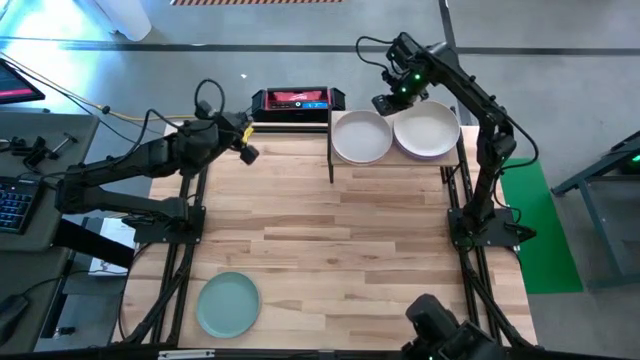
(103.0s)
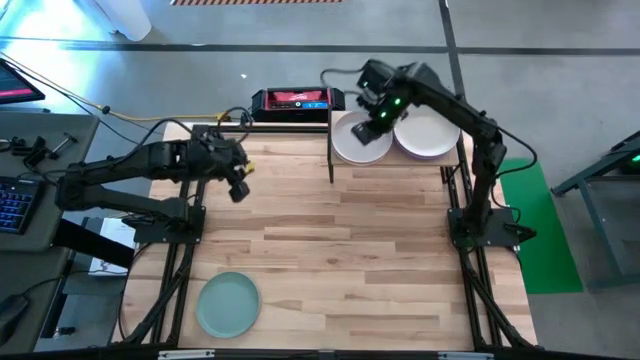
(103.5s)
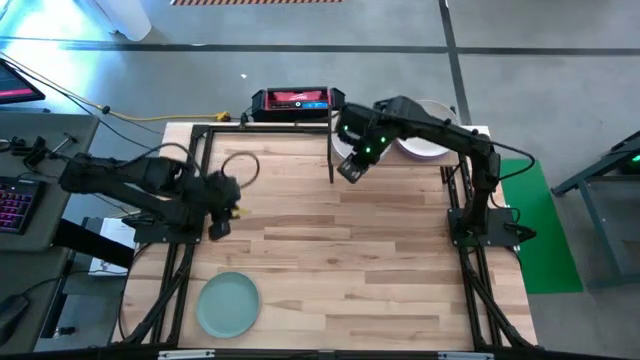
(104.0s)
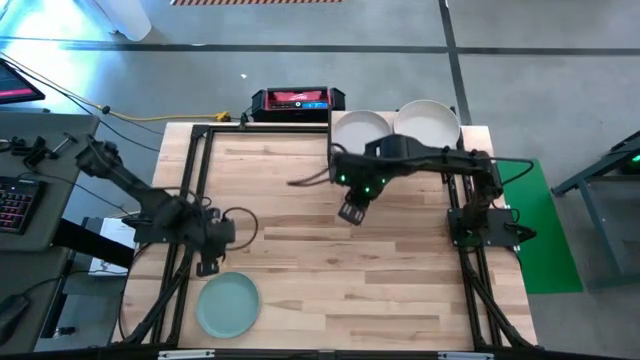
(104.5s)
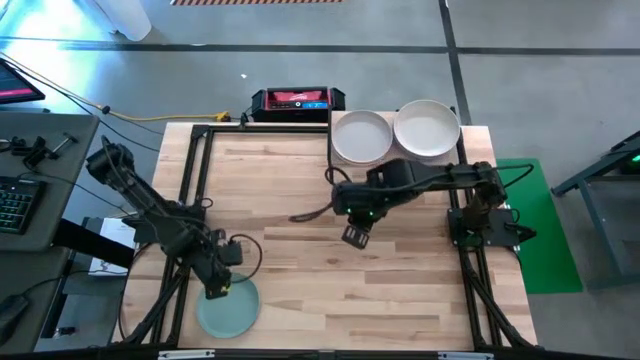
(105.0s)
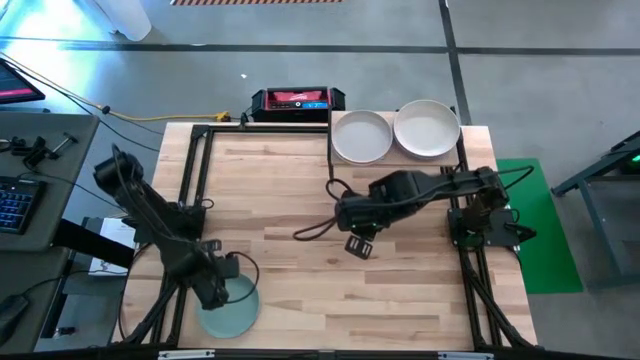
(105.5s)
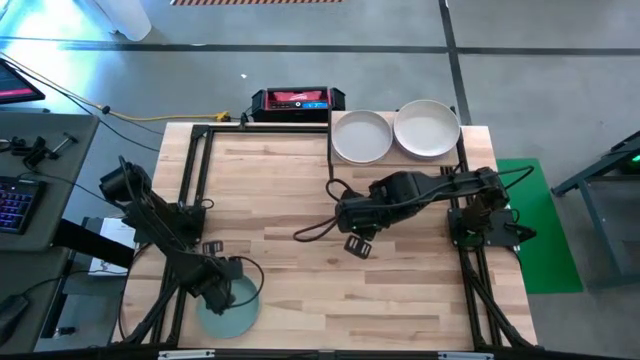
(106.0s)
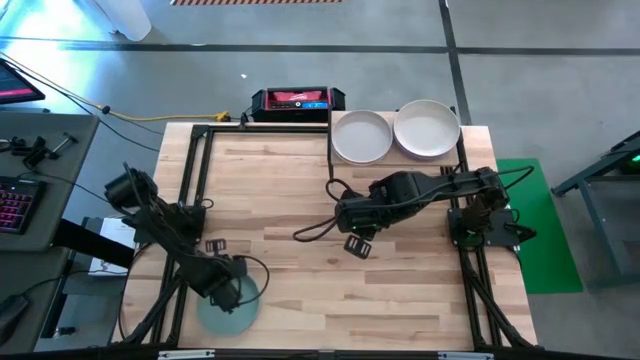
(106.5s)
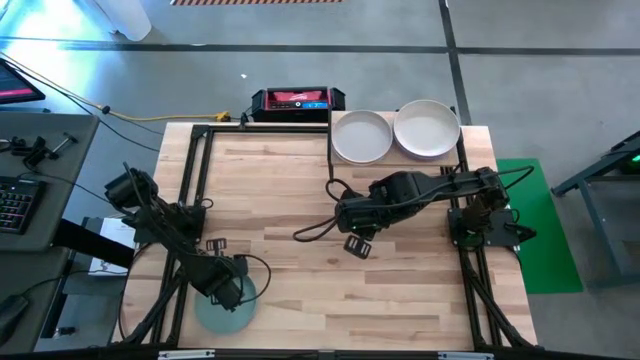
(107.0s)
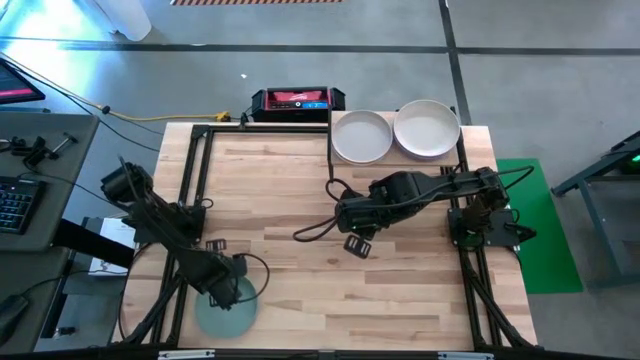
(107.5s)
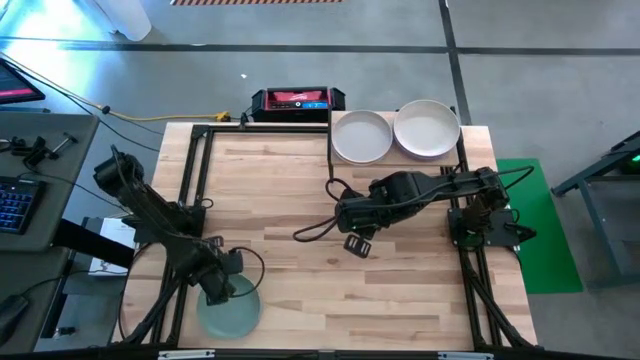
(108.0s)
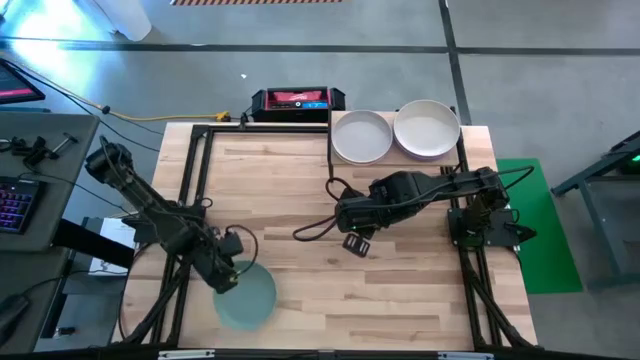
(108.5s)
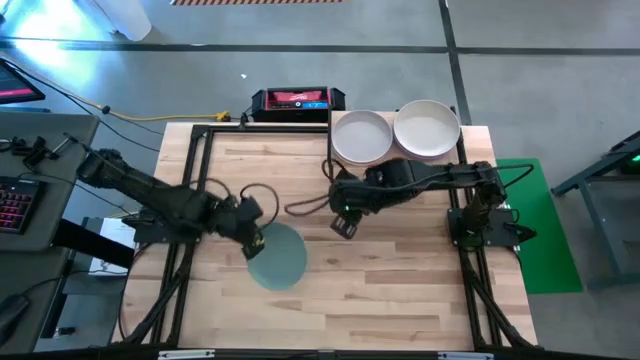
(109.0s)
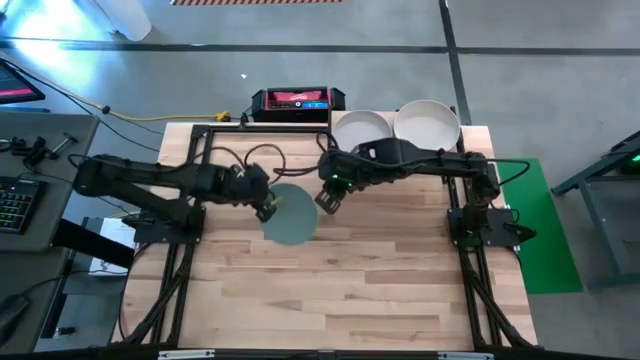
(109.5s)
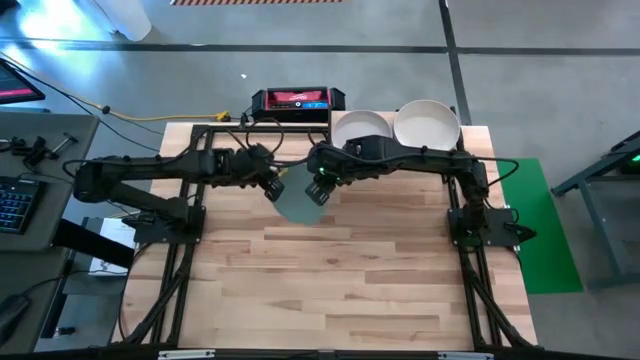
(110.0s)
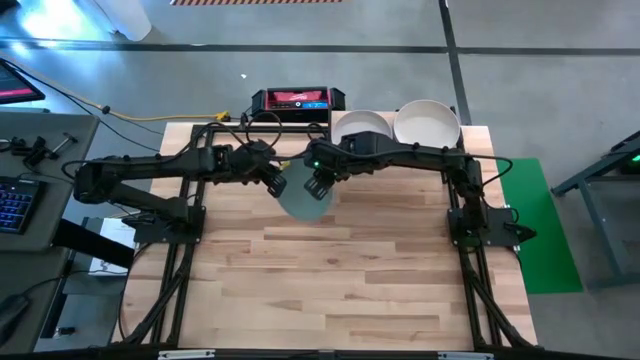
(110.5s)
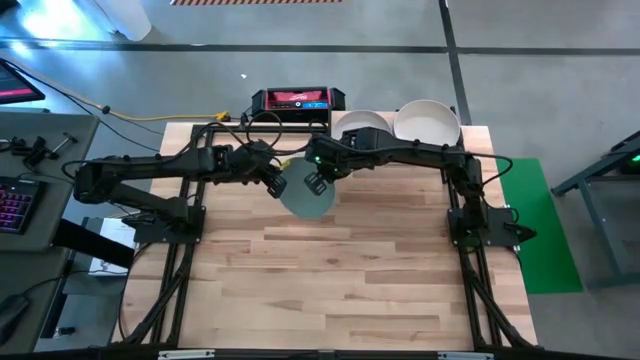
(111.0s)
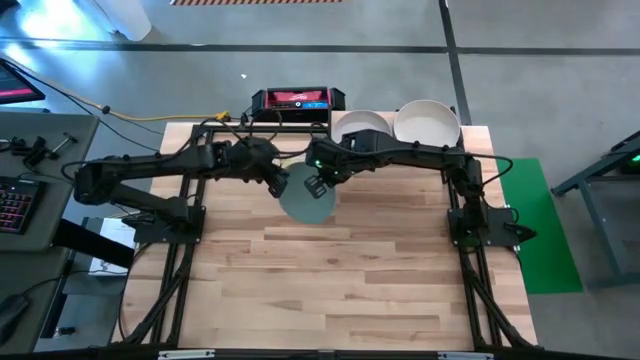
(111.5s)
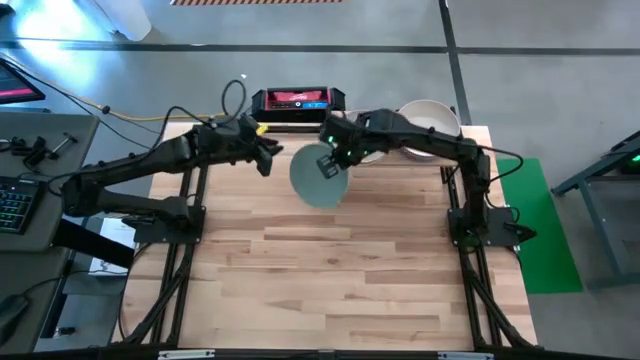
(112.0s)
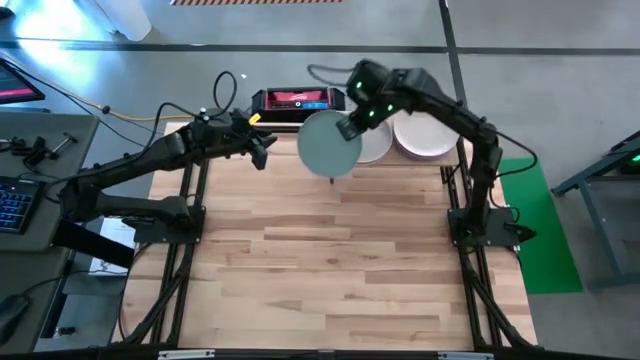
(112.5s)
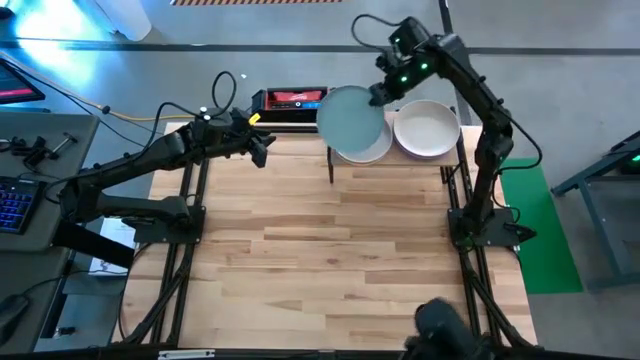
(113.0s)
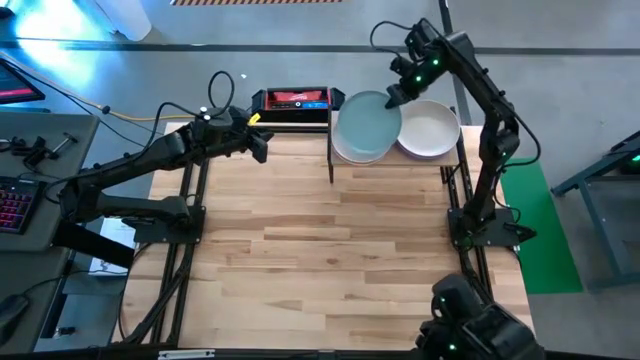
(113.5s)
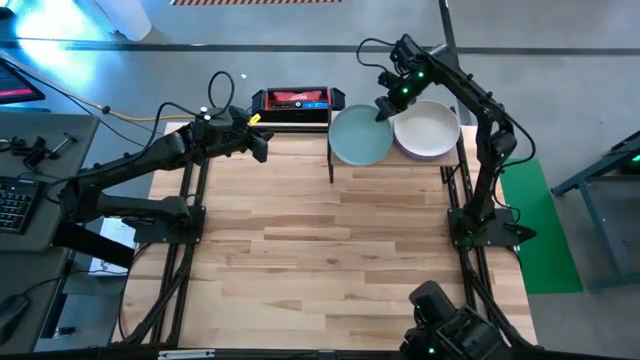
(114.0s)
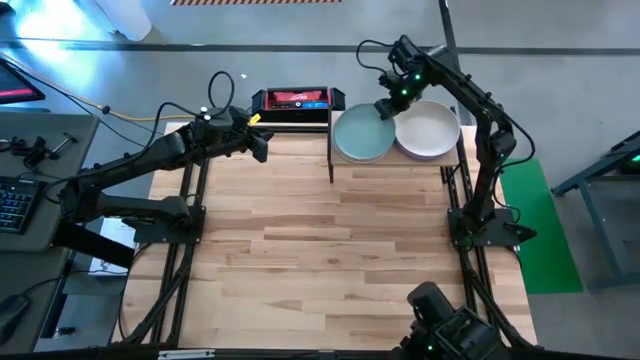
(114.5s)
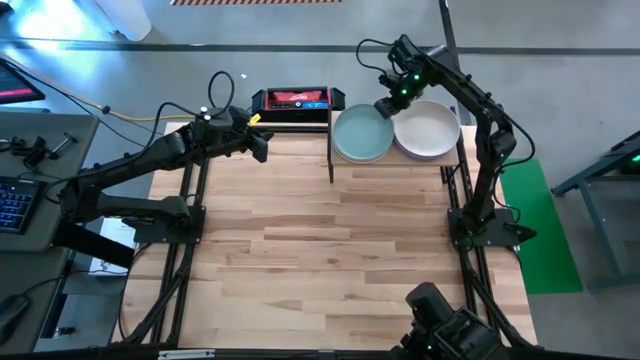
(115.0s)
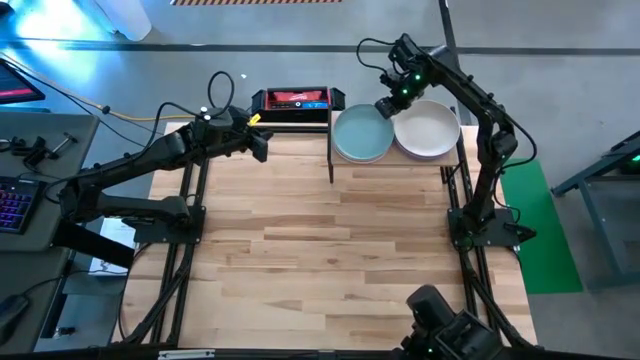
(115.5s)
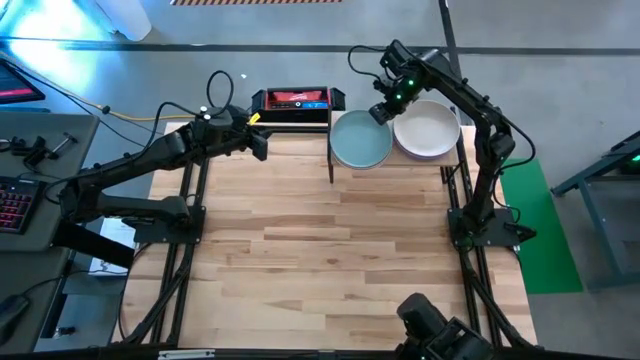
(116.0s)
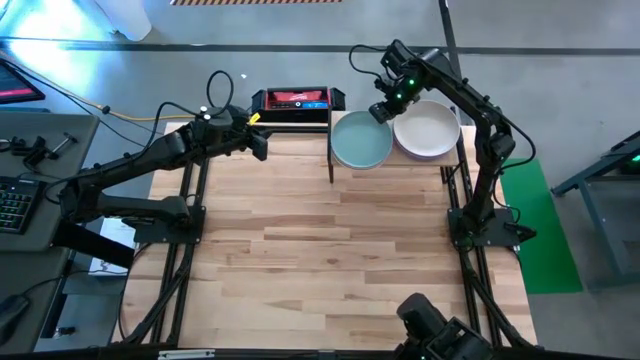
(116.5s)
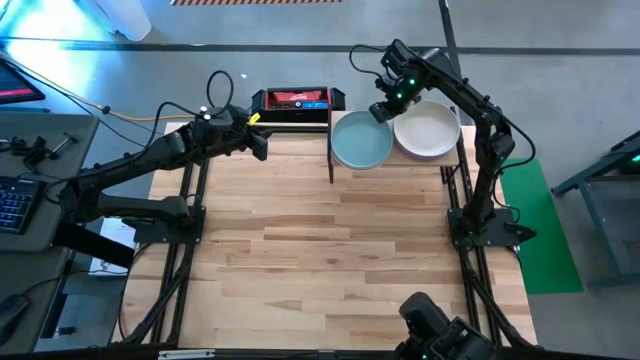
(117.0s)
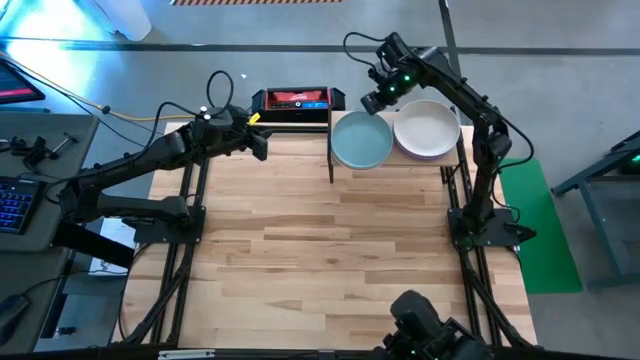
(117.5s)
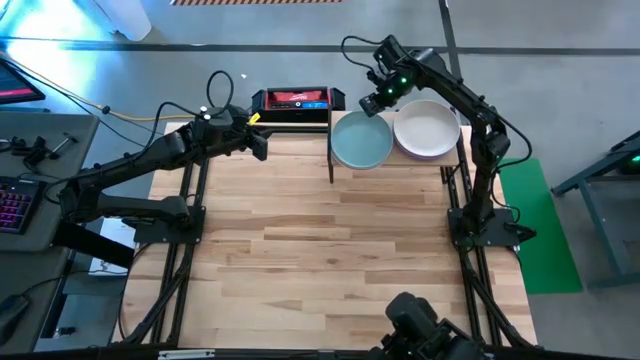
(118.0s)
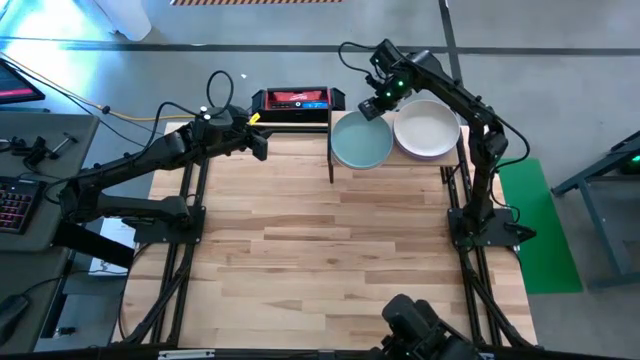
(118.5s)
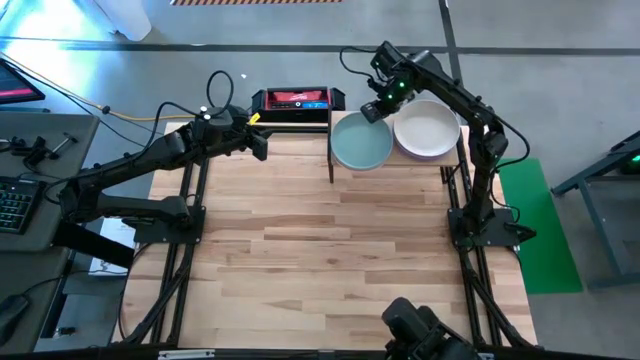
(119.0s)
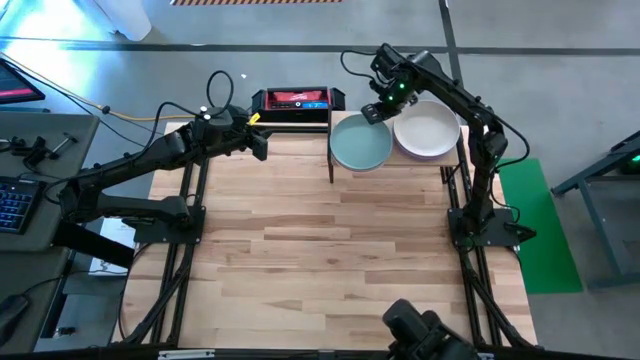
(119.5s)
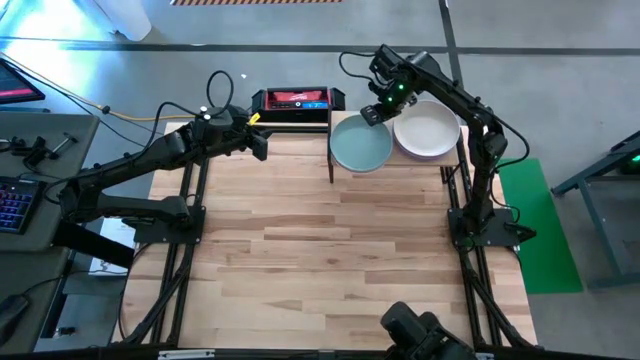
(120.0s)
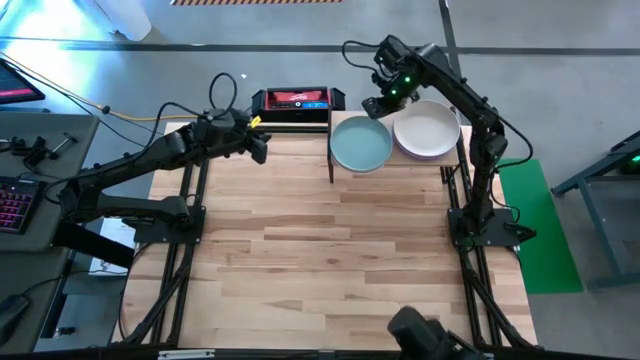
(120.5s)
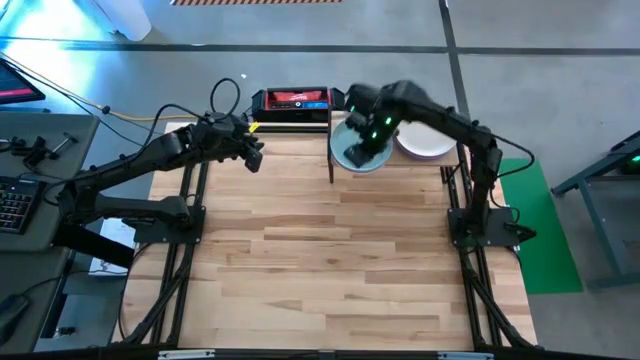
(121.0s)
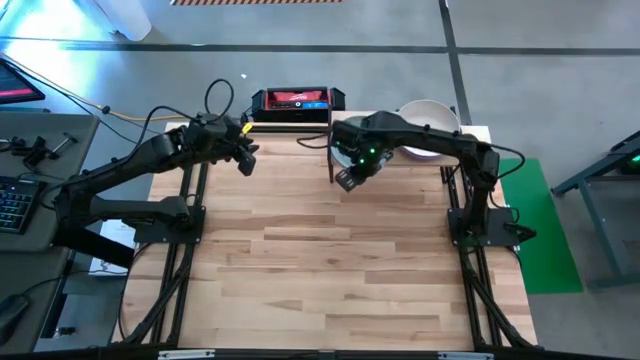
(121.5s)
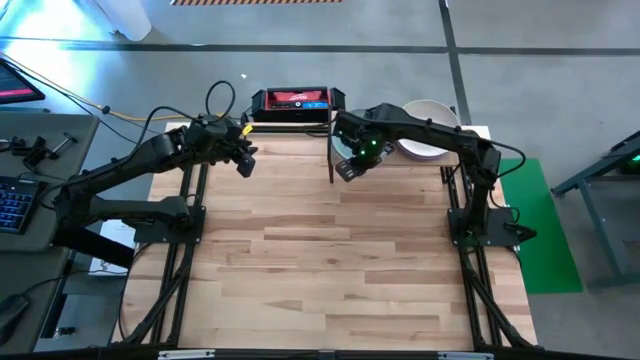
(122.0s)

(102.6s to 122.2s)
Task: Place and stack plates onto a shelf
Stack the green plate on top of the gray plate on the shelf

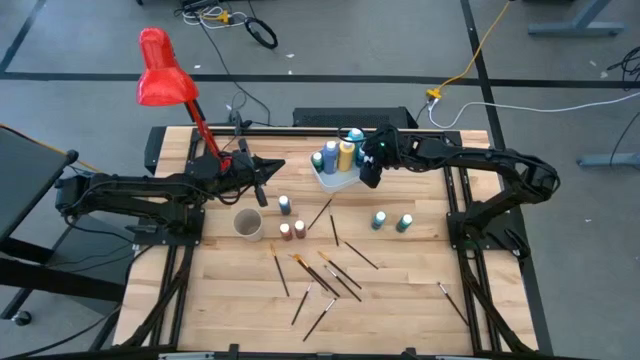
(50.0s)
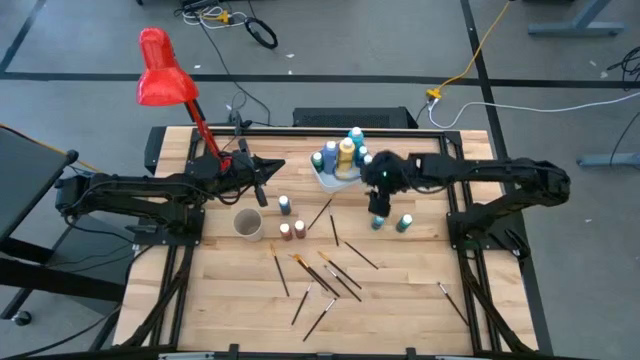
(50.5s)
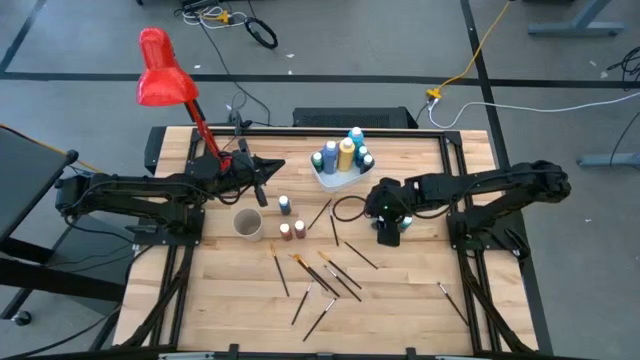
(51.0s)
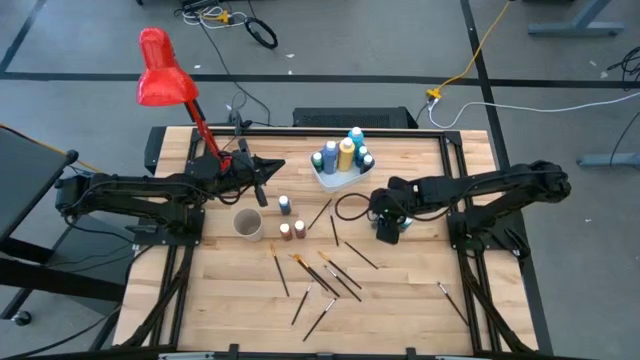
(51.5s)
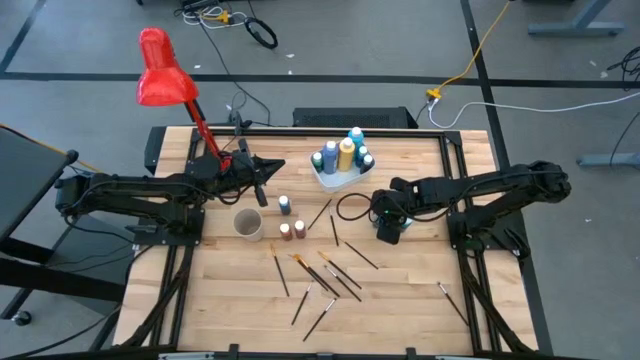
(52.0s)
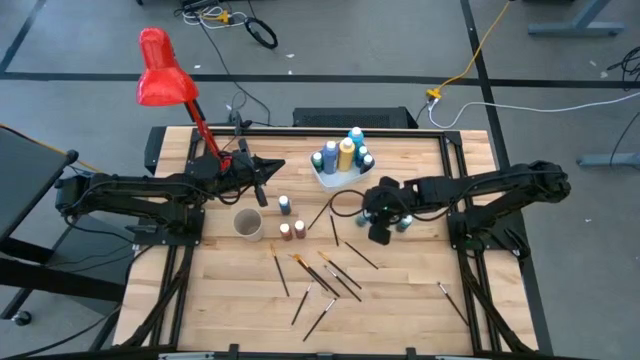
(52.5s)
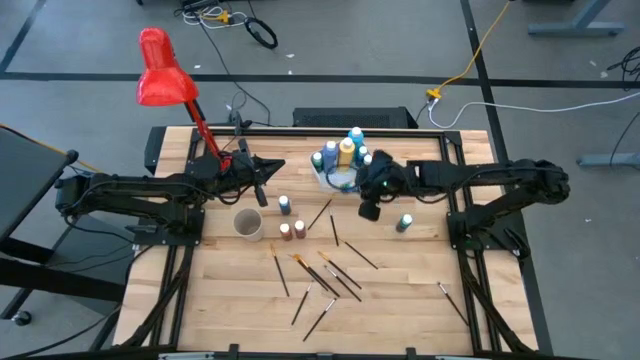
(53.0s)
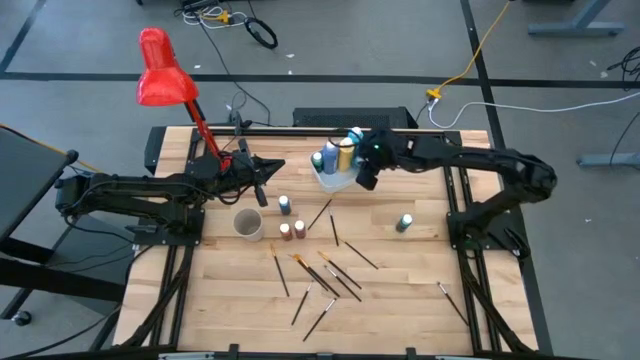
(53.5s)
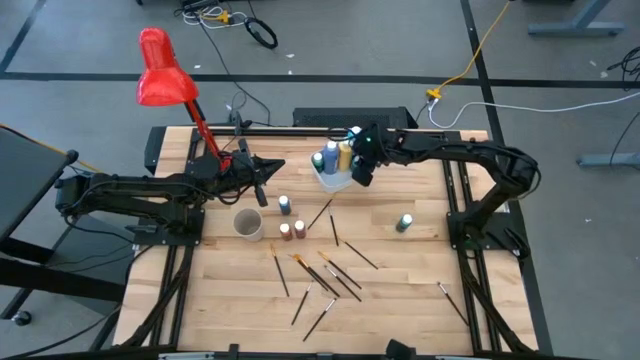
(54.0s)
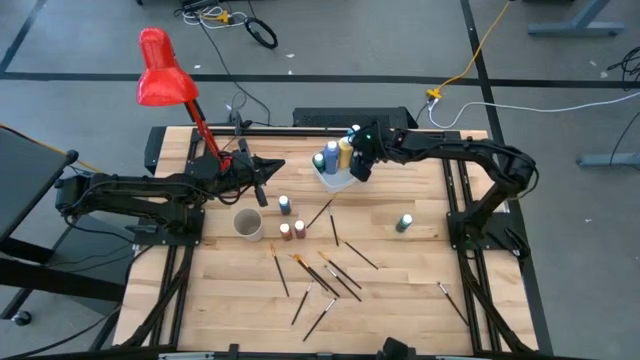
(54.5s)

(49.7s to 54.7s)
Task: Pick & Place Paint Supplies
Put the small light blue paint bottle into the white bin
